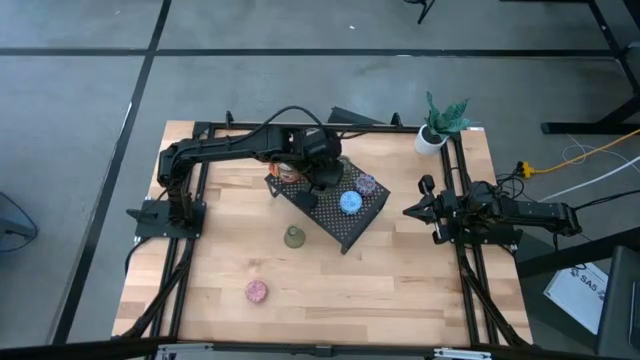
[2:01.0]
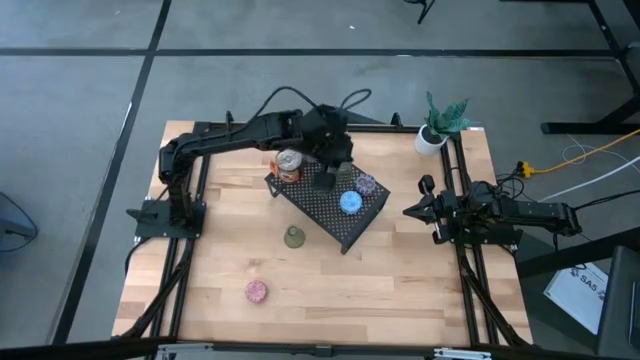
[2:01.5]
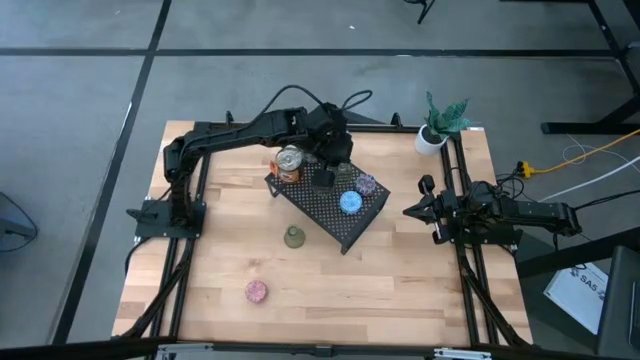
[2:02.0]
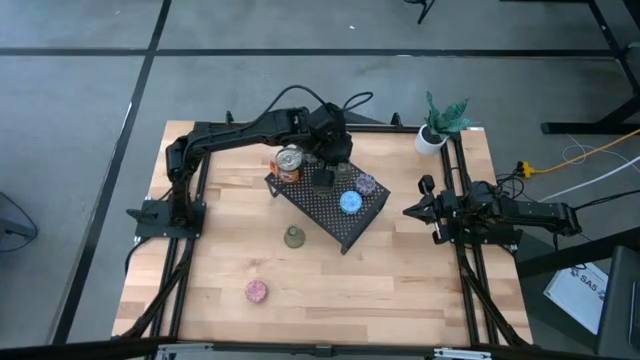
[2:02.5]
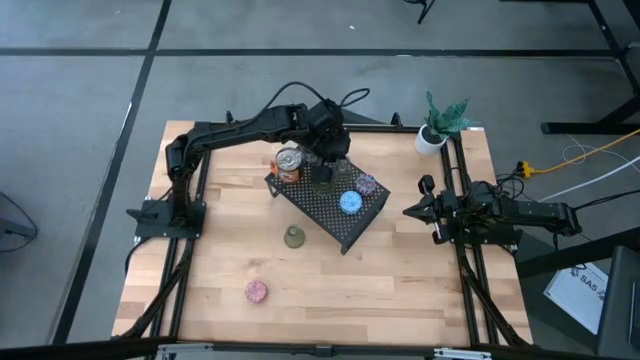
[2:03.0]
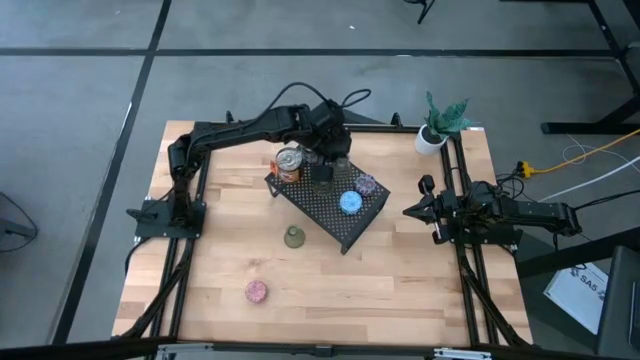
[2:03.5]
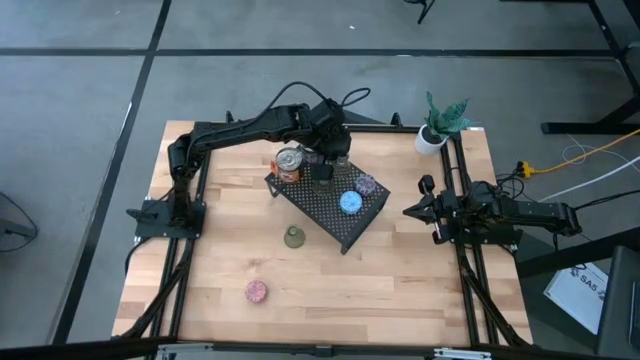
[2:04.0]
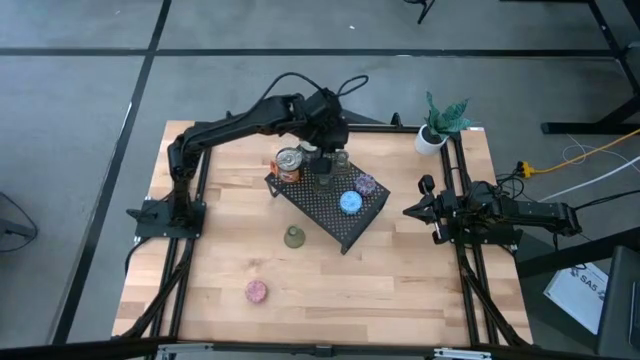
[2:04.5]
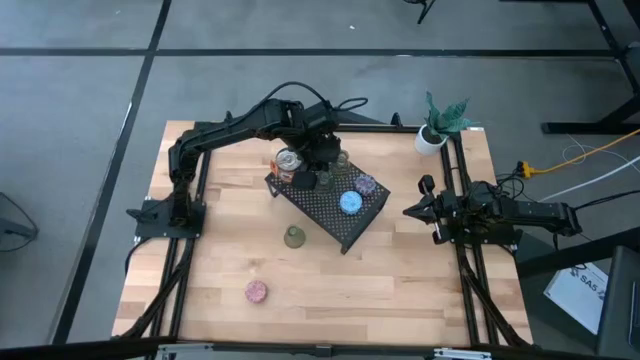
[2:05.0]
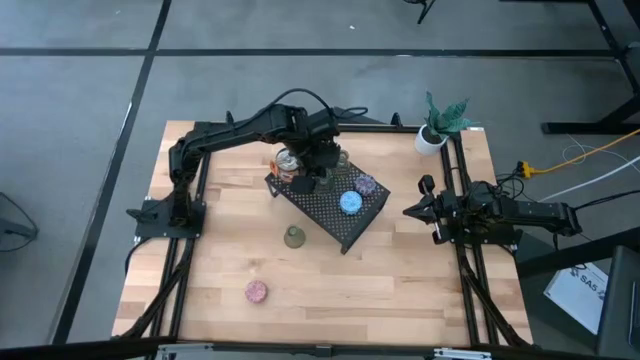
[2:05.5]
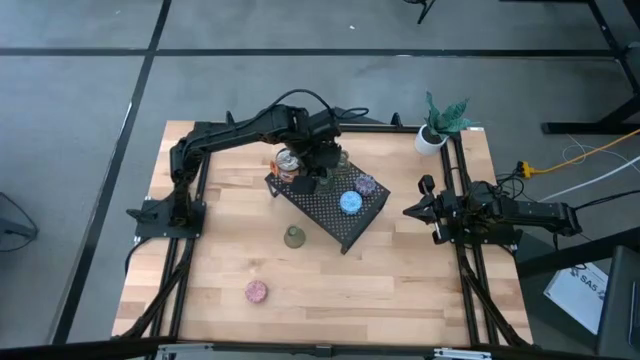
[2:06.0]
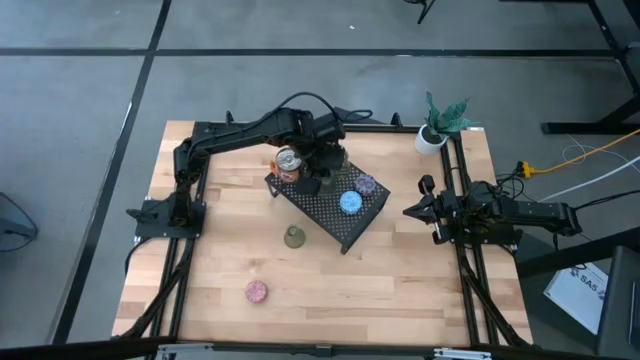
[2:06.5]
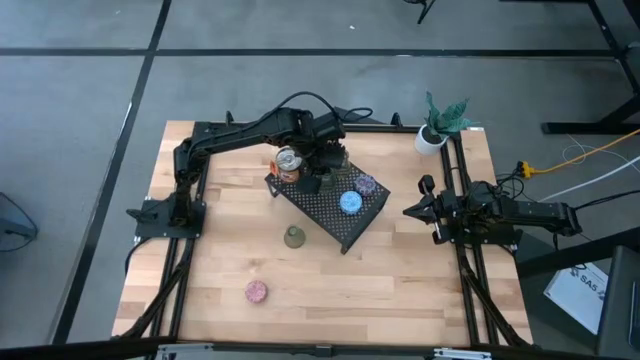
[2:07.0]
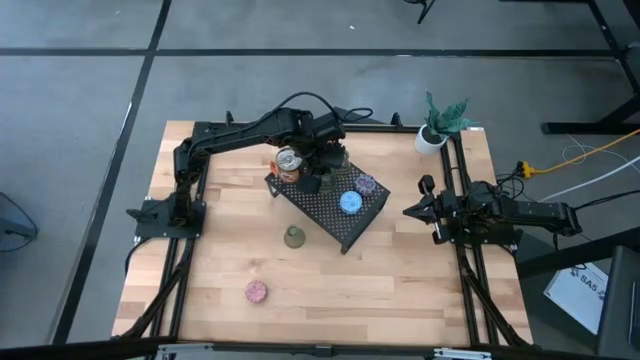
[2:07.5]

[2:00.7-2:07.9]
Task: Pick & Place candle stick holders
Adjust the glass candle holders on the shelf

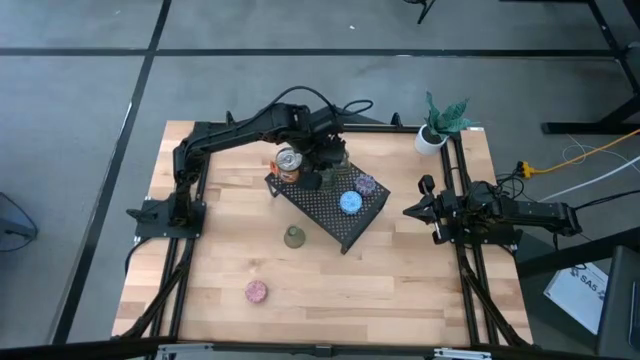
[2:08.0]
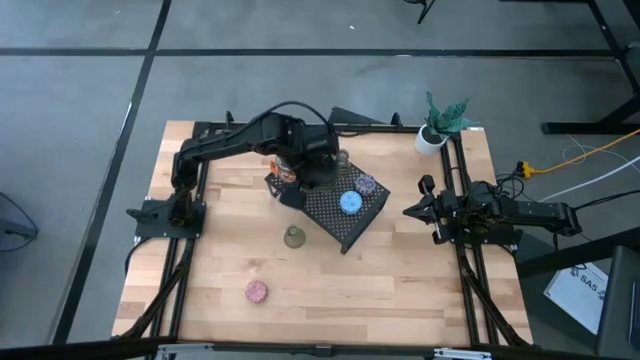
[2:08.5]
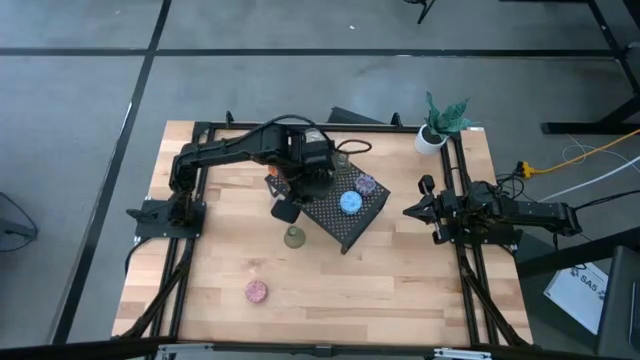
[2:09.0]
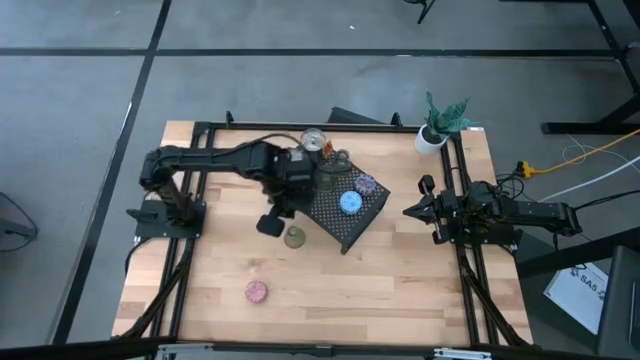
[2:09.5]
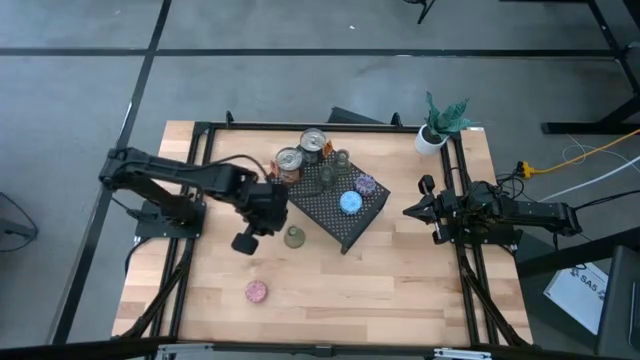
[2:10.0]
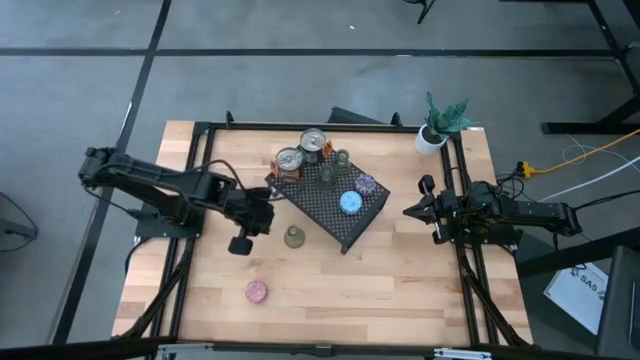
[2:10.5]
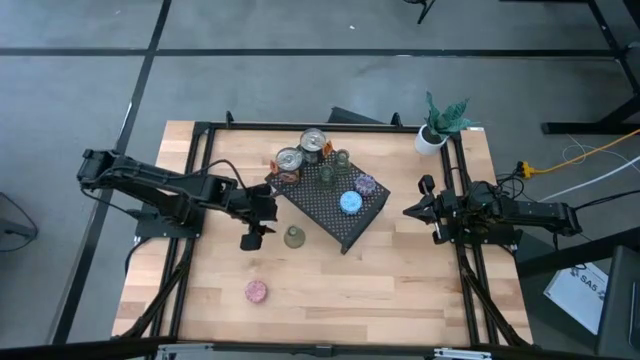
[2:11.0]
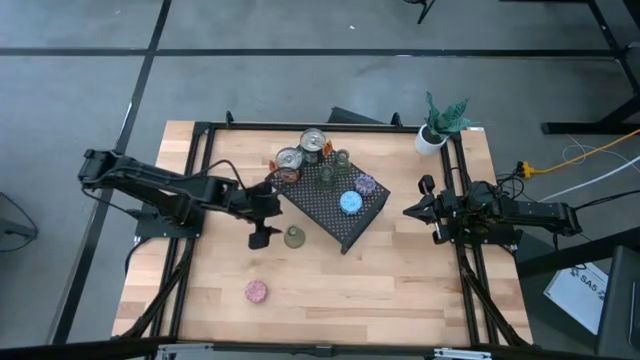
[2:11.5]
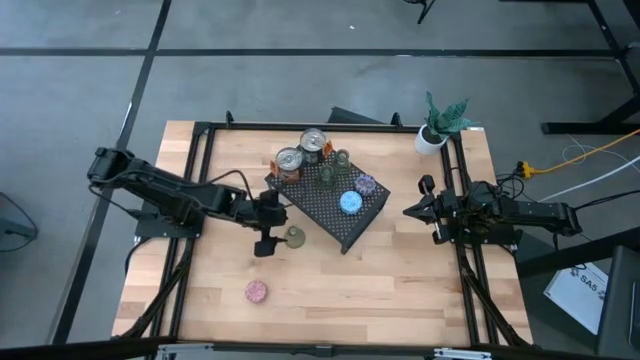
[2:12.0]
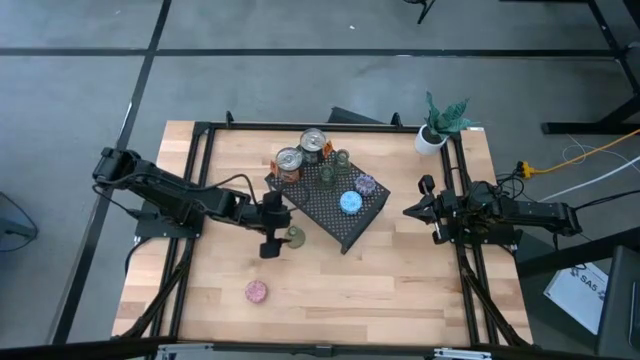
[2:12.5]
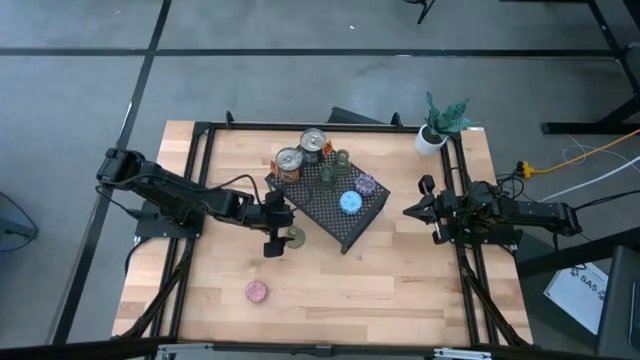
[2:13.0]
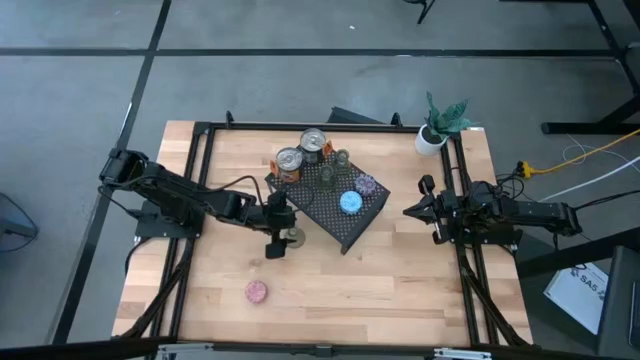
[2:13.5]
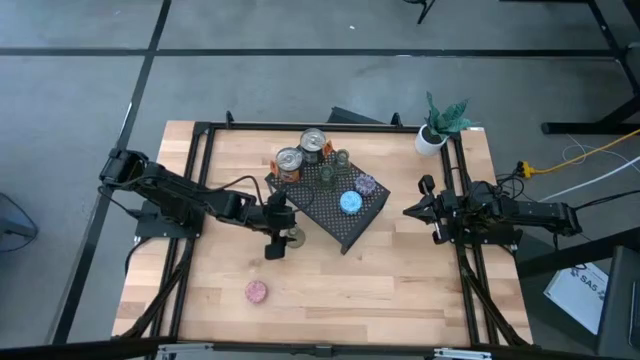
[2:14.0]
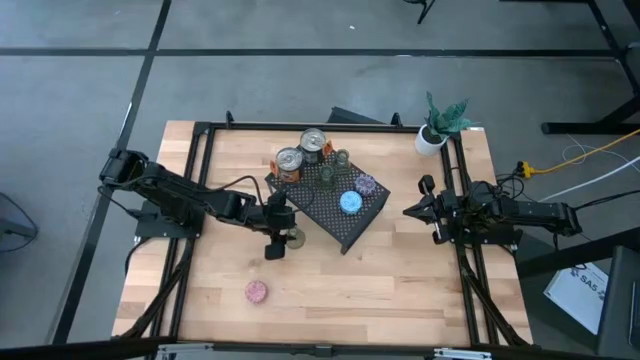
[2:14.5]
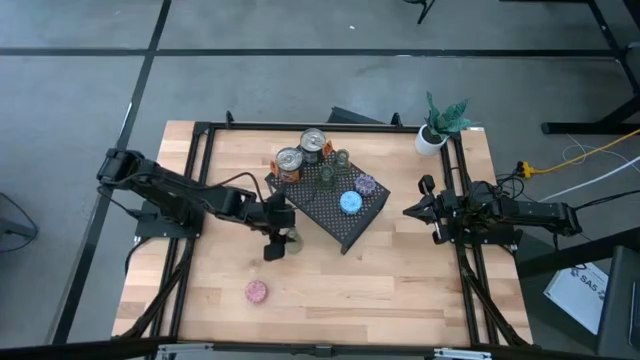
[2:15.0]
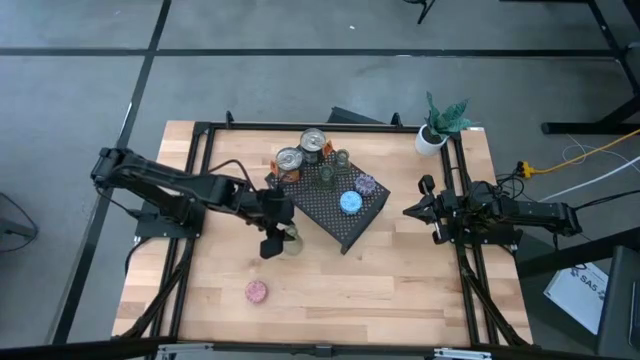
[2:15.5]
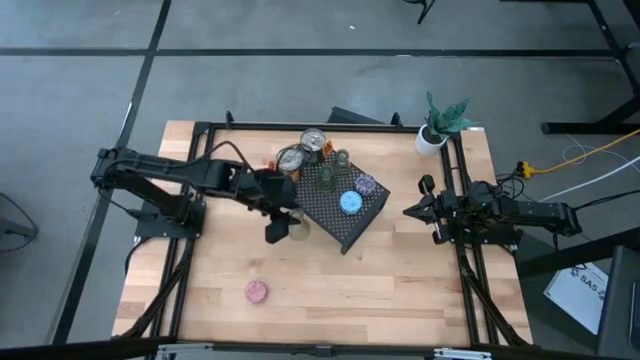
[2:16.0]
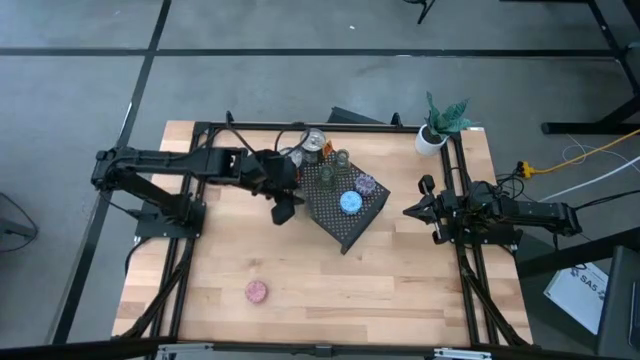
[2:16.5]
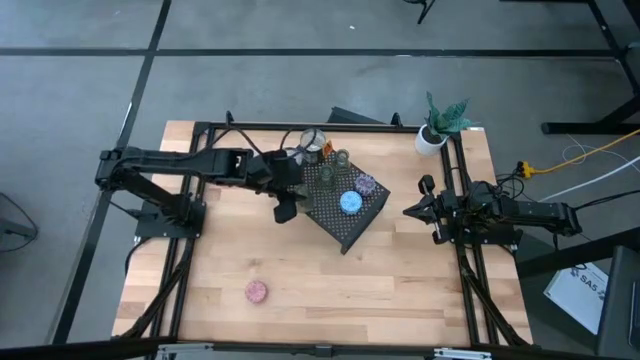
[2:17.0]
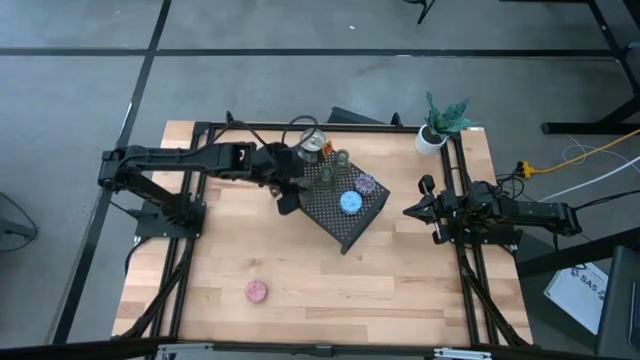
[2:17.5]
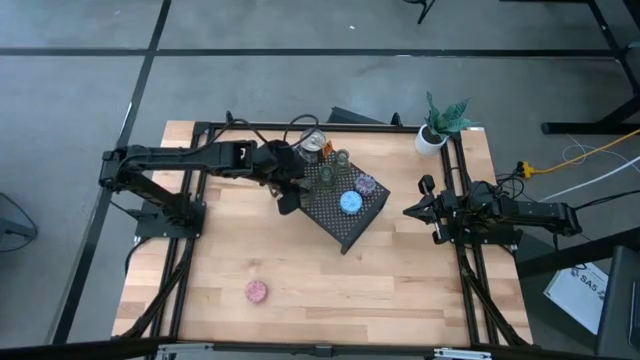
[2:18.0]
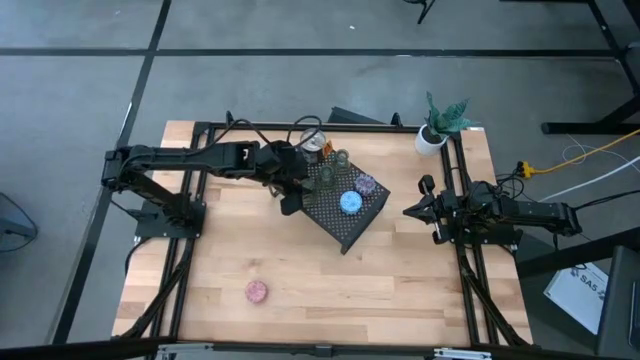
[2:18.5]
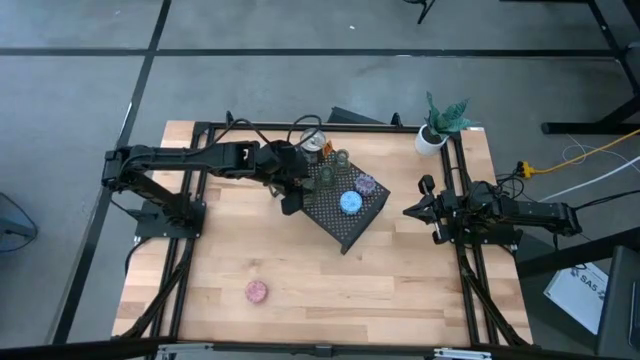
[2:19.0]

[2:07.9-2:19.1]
Put the glass candle holder on the shelf
